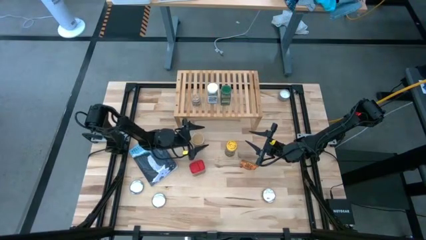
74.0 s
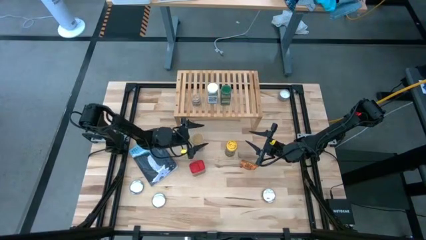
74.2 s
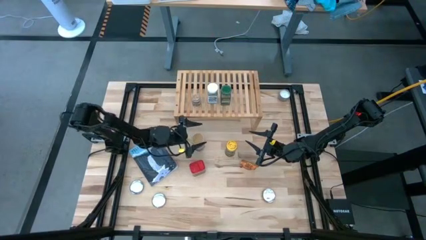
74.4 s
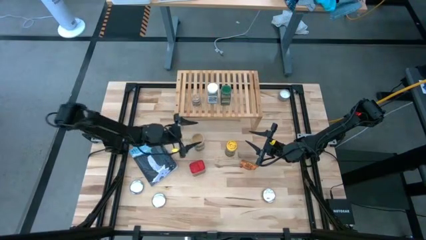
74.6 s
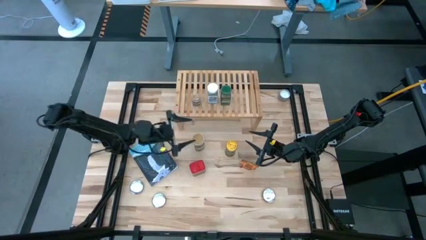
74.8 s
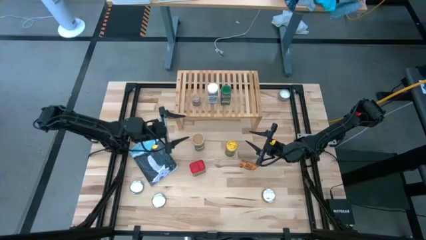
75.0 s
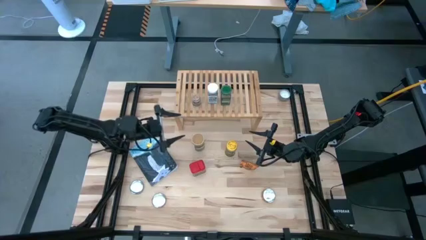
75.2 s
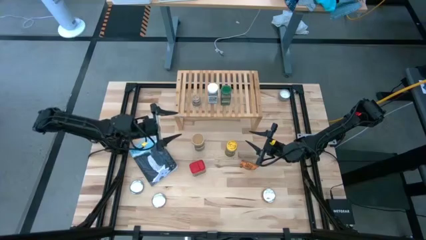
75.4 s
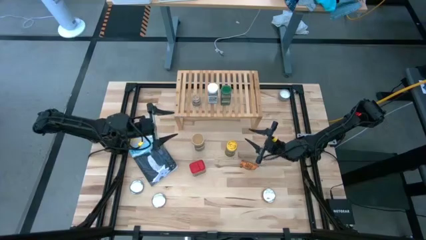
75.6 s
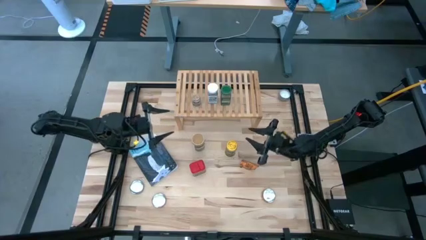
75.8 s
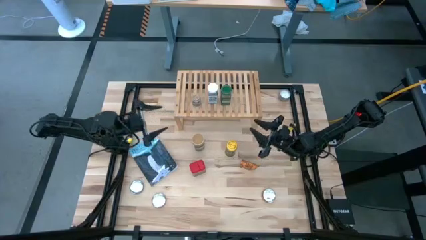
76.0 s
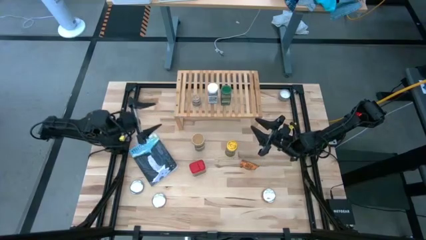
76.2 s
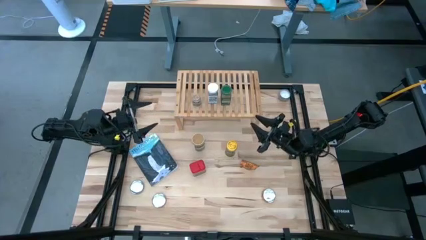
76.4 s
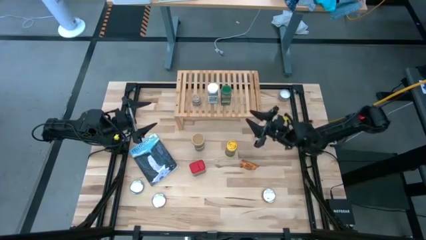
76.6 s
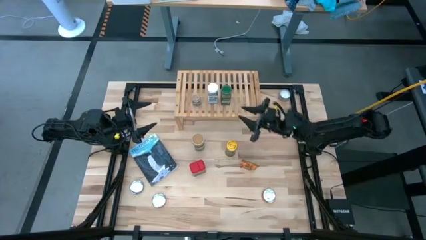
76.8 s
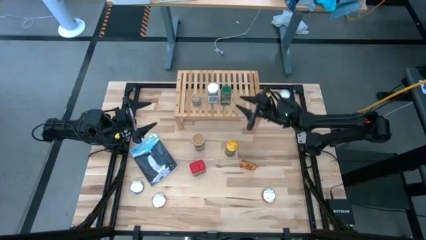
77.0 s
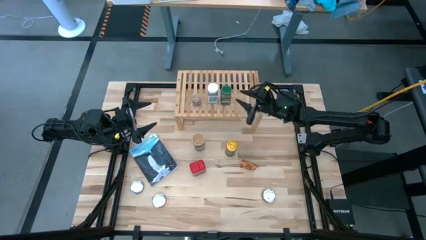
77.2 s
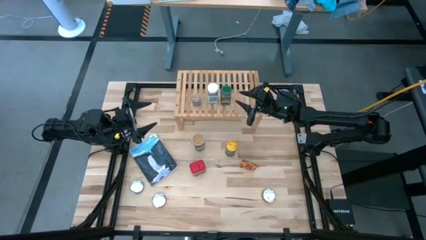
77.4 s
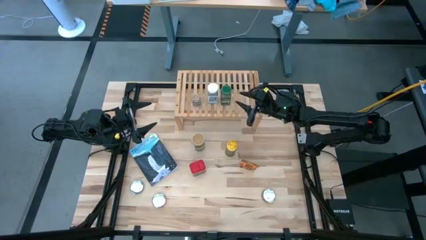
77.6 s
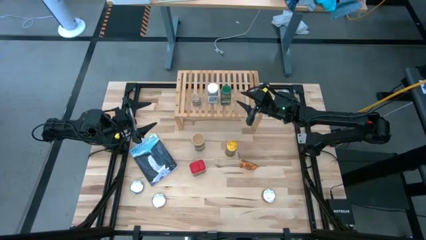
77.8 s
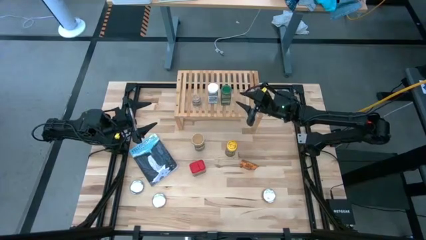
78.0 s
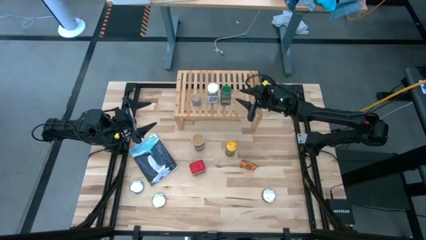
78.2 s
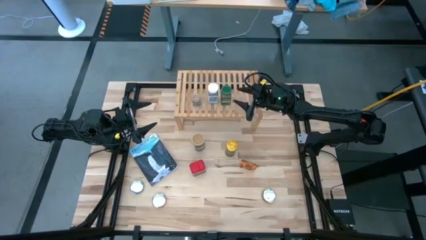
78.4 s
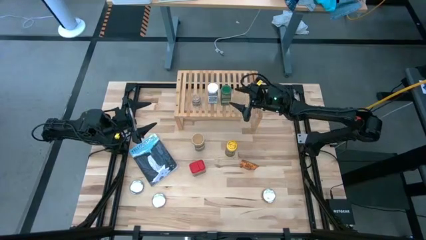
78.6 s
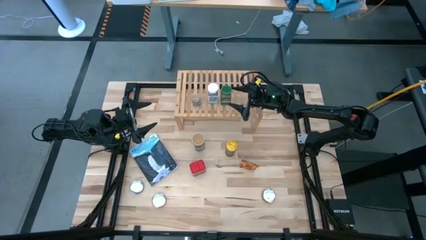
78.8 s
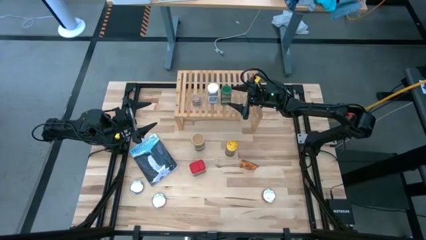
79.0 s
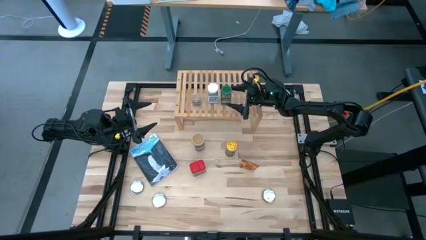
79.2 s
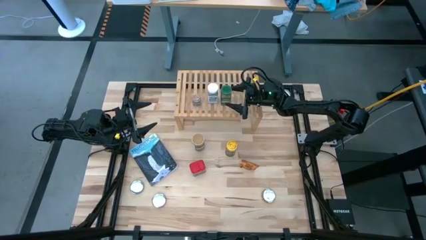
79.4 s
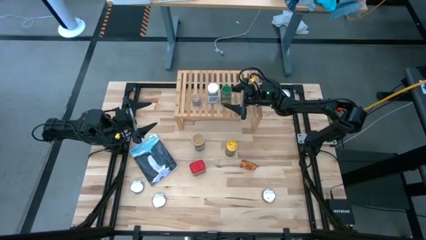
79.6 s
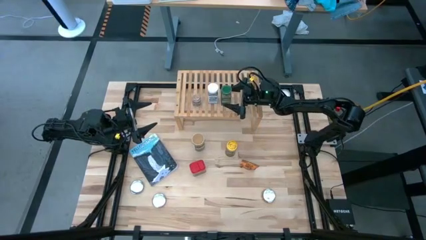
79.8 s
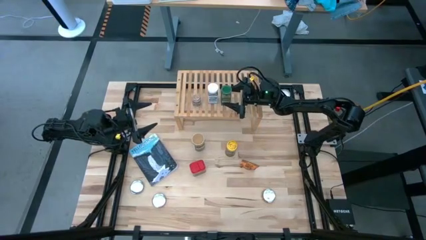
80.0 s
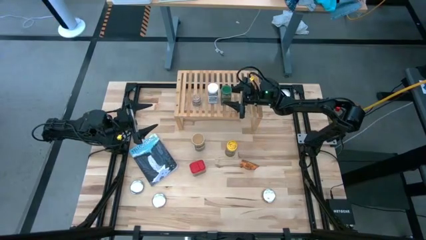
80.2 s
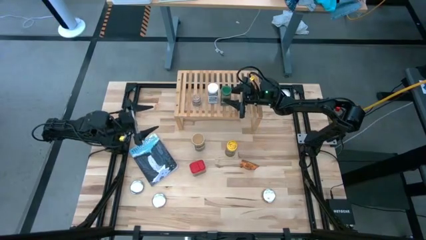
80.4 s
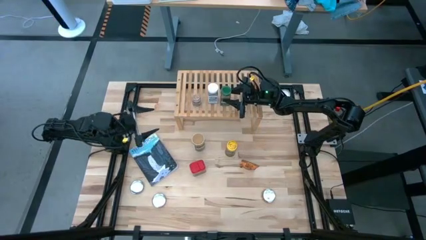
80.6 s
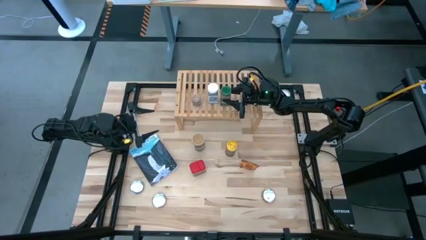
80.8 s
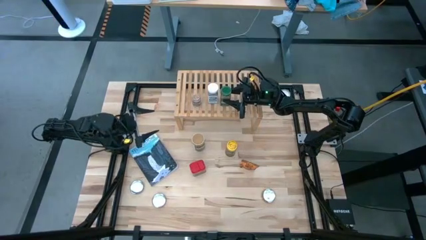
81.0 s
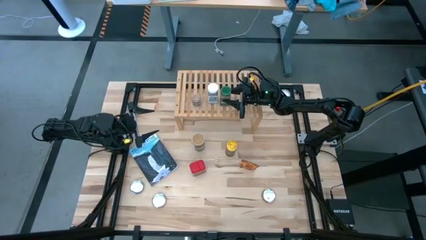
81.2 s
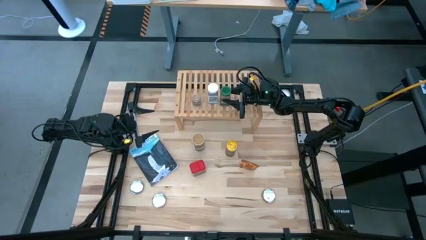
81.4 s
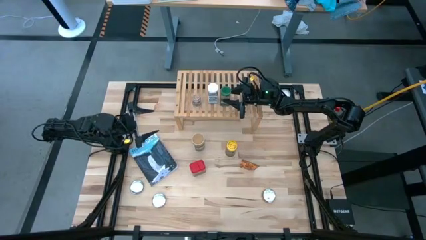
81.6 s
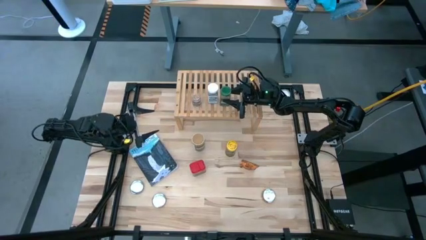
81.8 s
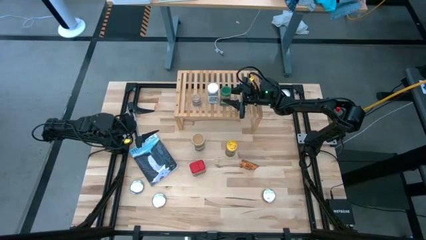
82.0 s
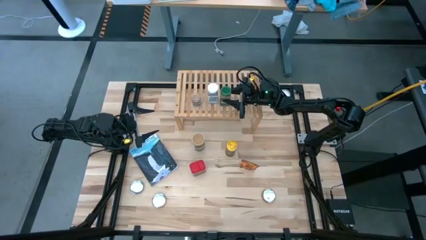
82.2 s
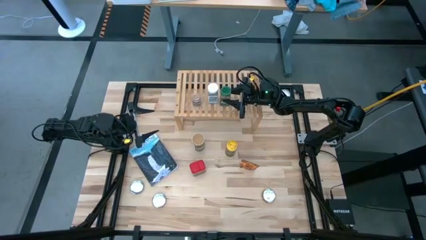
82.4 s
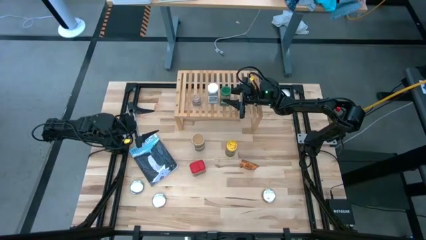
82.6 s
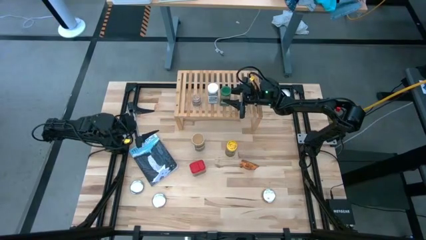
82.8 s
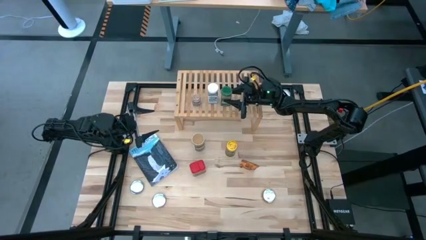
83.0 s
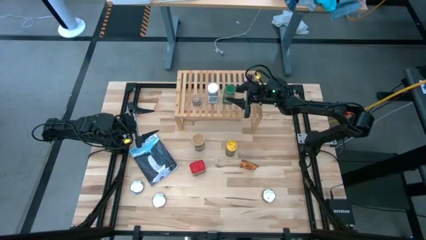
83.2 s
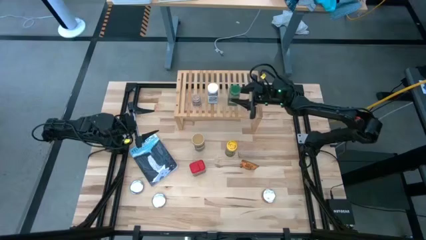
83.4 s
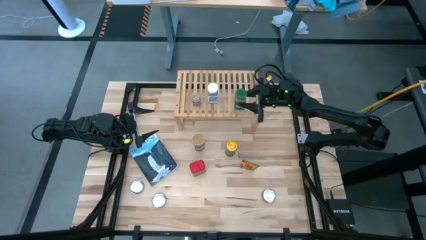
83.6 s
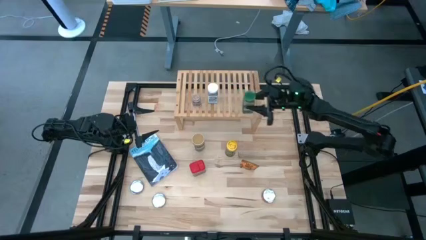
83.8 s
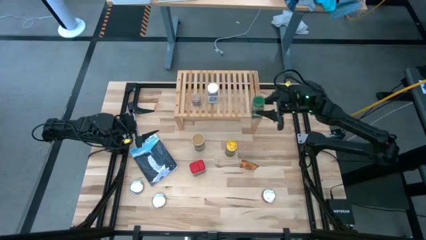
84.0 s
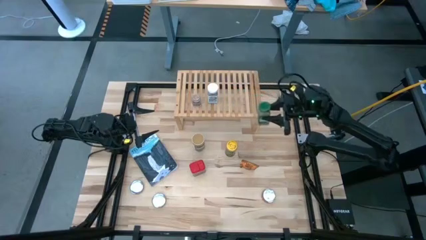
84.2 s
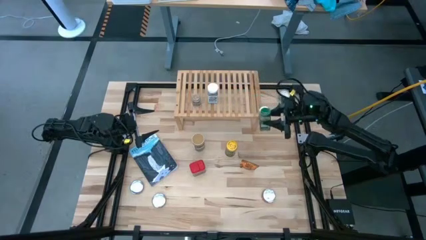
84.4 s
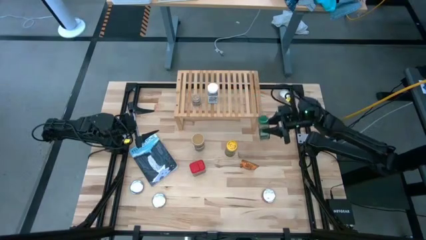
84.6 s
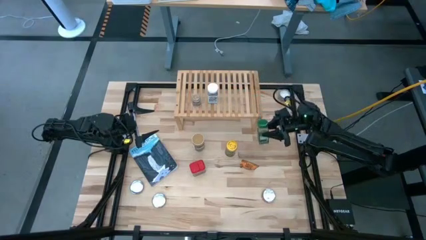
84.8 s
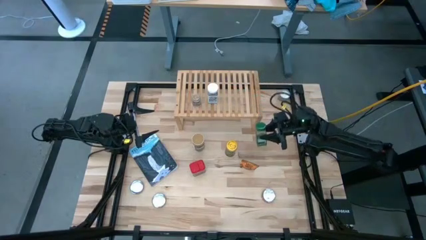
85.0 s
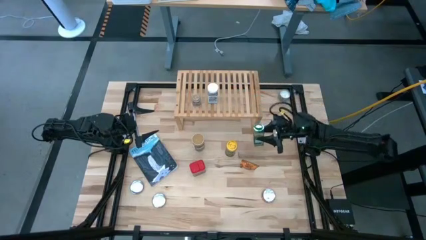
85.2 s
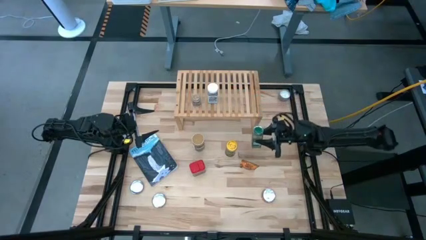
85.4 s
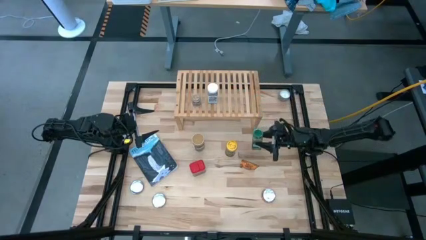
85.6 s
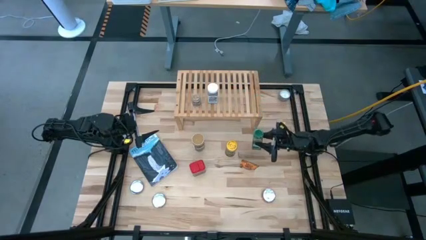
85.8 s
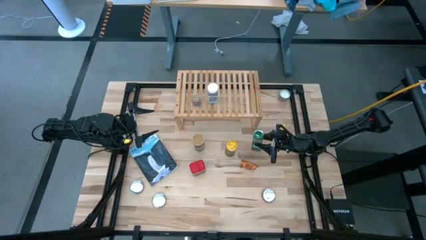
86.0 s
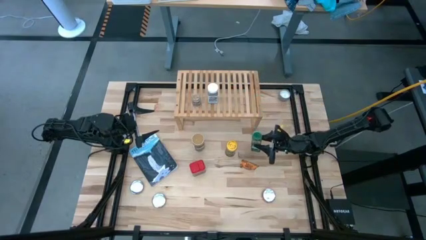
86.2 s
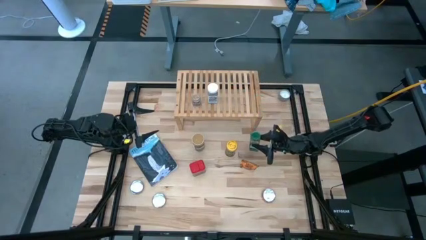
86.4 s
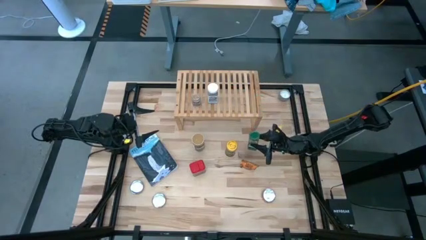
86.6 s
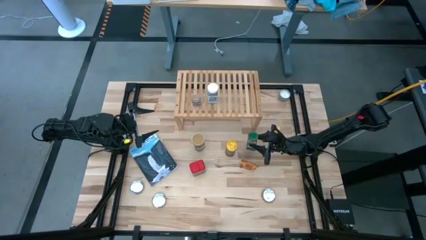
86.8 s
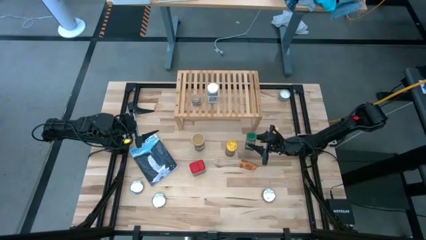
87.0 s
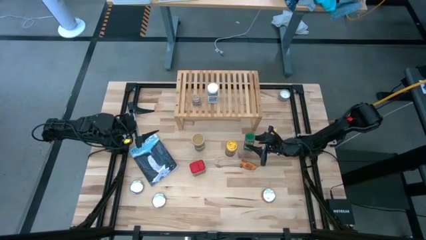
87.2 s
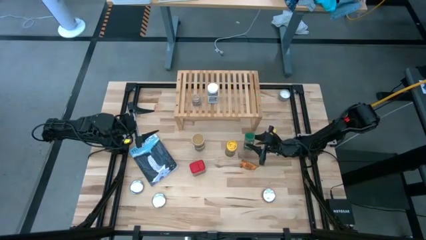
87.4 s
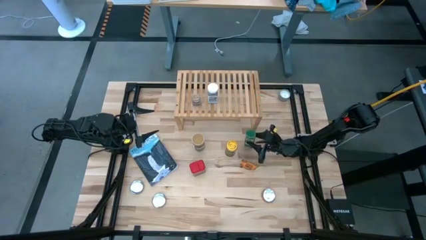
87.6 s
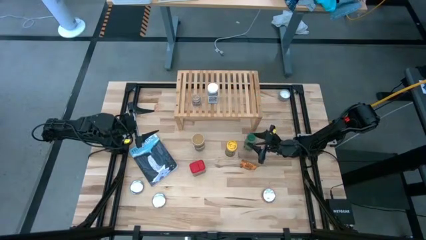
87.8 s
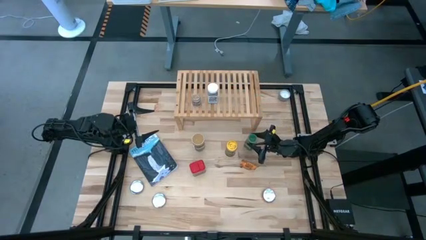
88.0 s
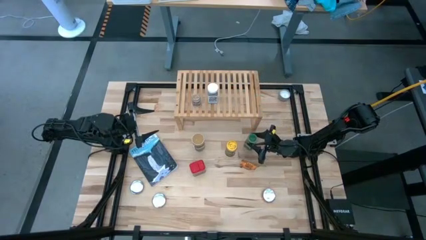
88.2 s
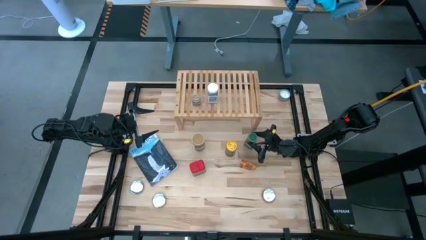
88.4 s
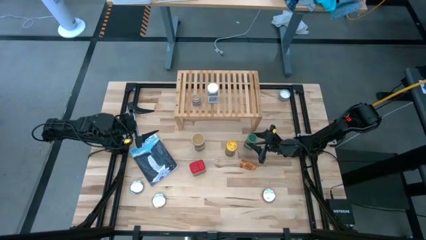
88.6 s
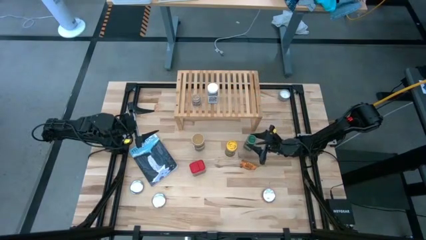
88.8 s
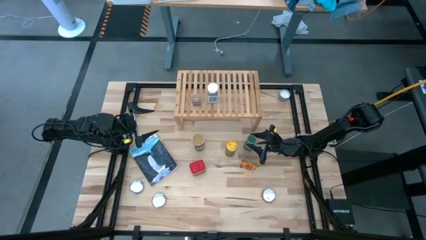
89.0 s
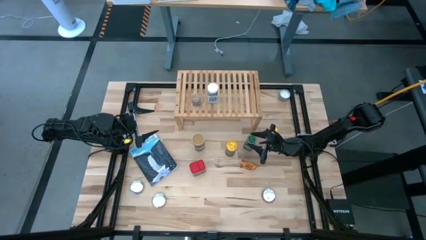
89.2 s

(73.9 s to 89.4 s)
Task: Shelf spices
Remove the green seasoning bottle from the shelf

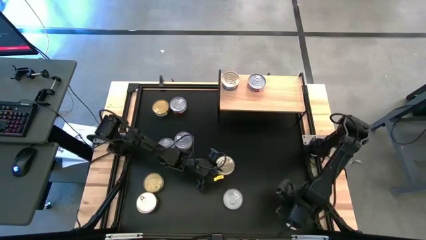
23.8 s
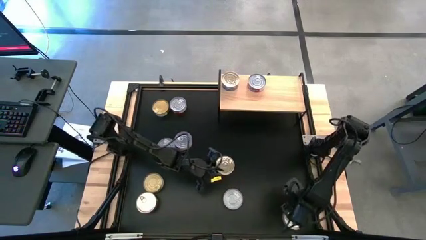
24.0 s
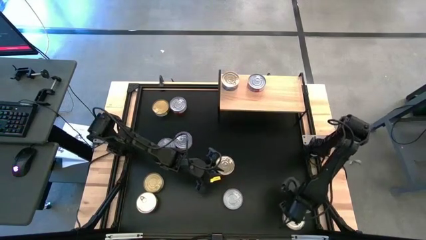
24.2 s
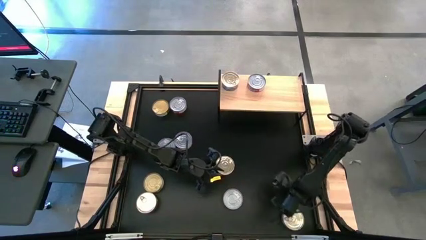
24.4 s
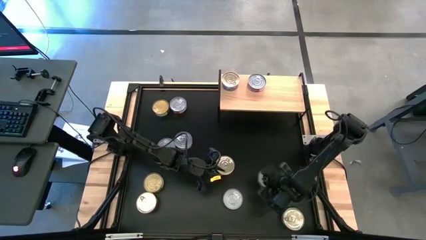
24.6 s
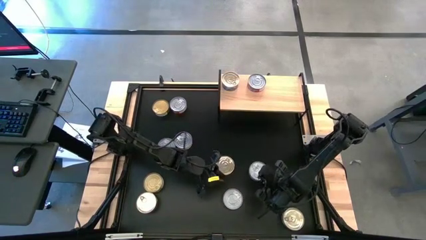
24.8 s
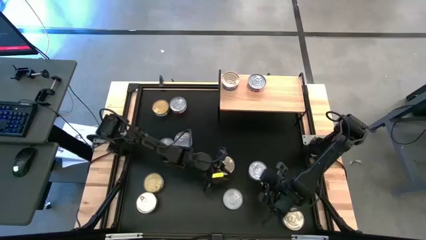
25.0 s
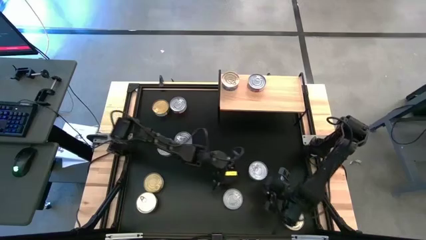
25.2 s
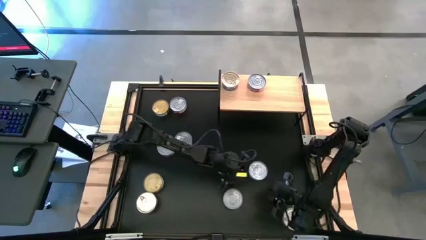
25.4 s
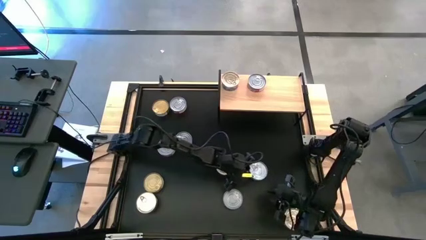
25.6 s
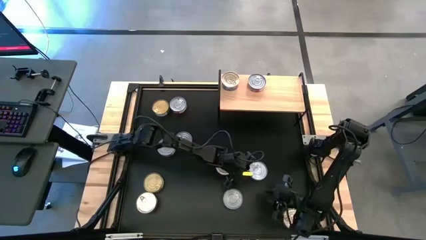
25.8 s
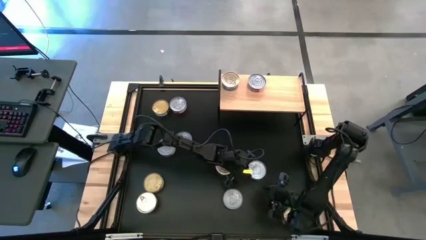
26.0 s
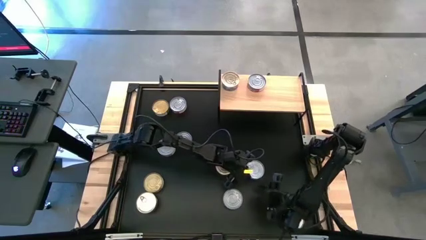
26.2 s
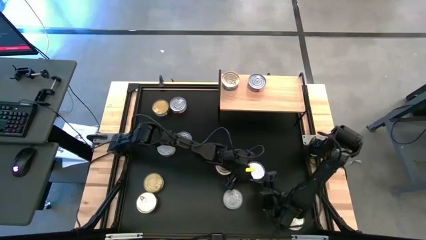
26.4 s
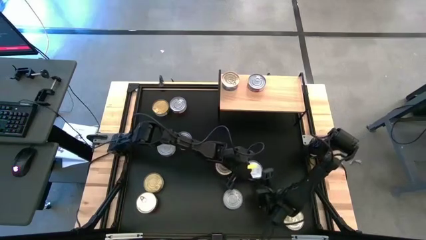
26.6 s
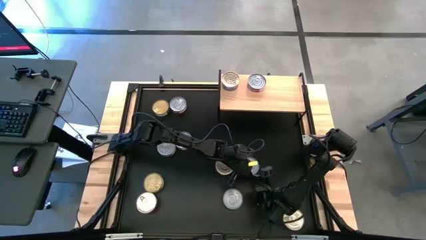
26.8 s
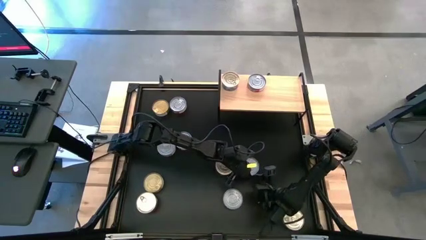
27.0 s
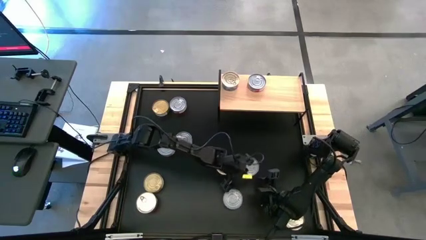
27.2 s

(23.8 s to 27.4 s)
Task: Stack canned seafood by type on shelf
Put the green tuna can on the shelf
